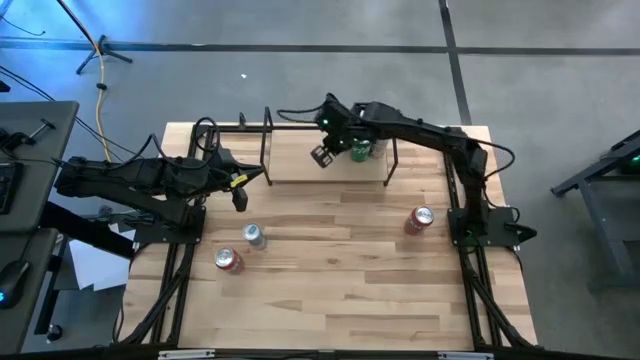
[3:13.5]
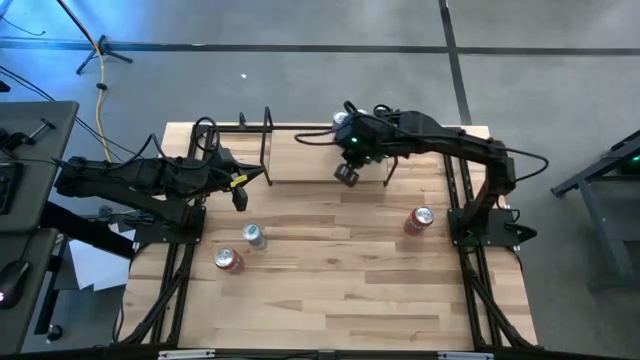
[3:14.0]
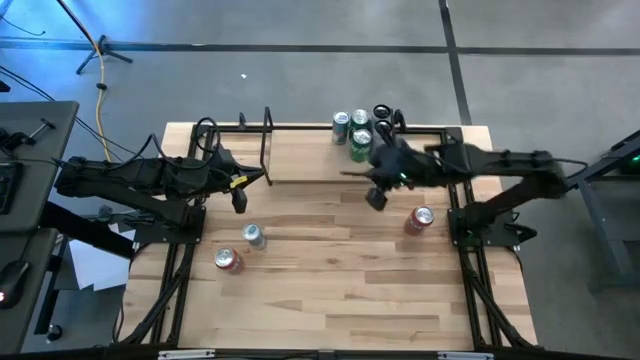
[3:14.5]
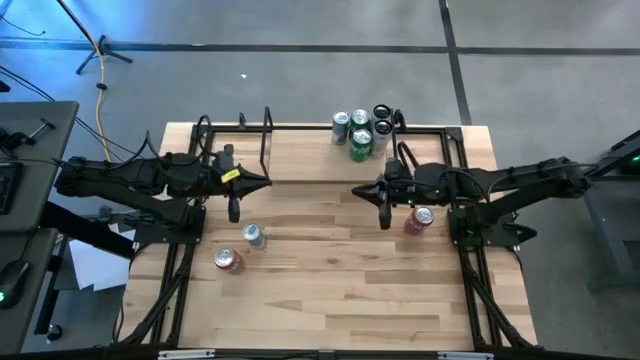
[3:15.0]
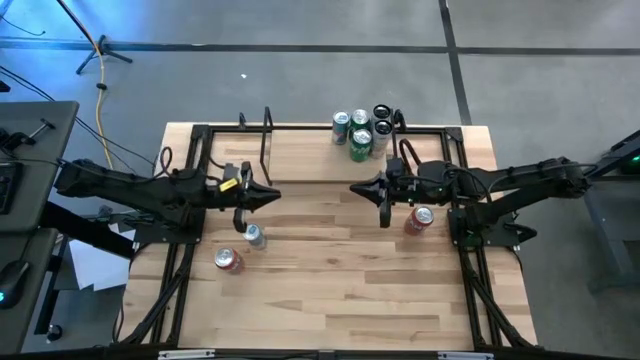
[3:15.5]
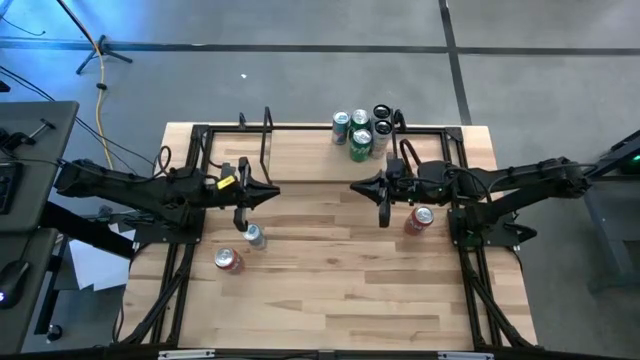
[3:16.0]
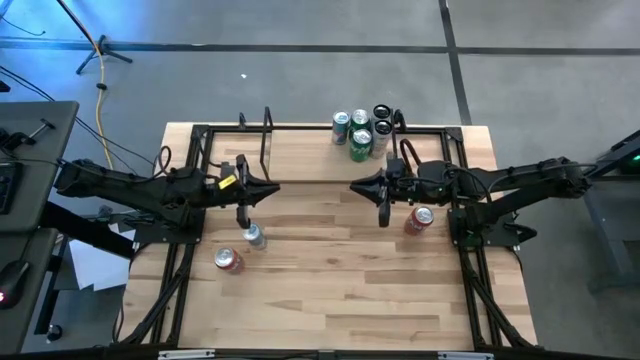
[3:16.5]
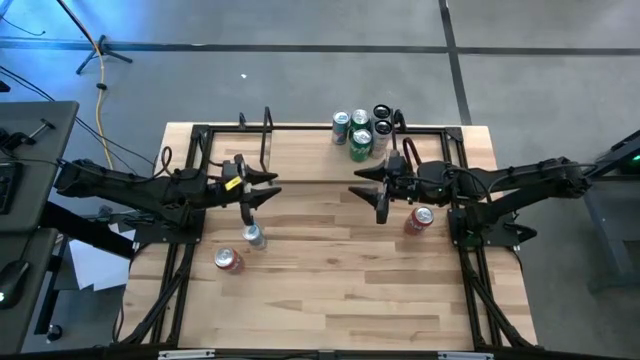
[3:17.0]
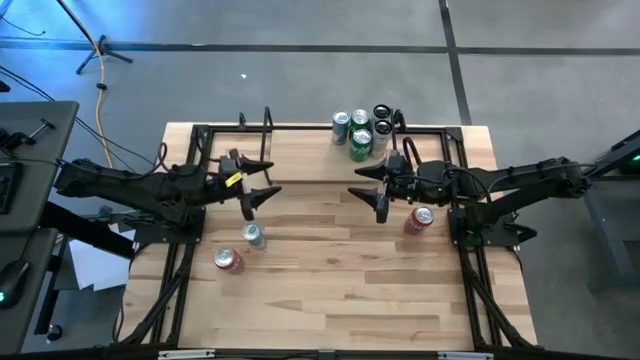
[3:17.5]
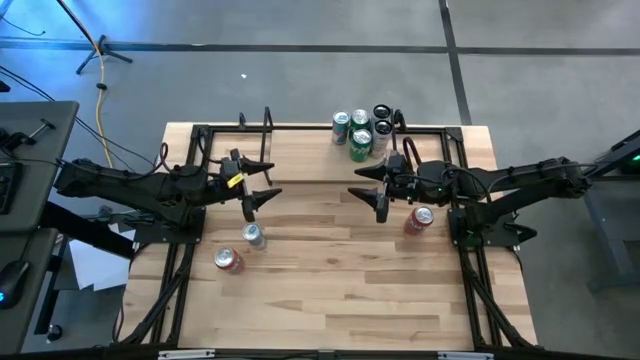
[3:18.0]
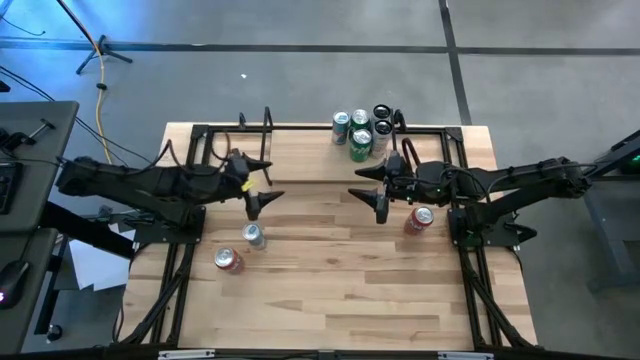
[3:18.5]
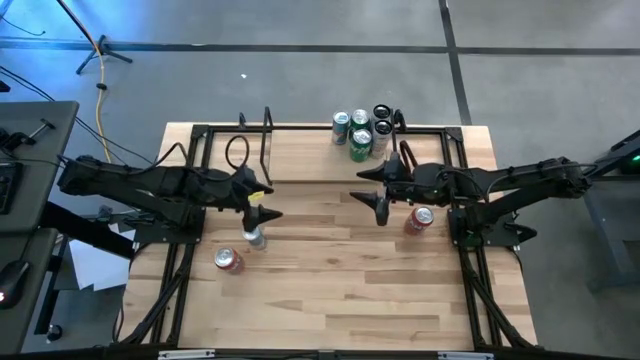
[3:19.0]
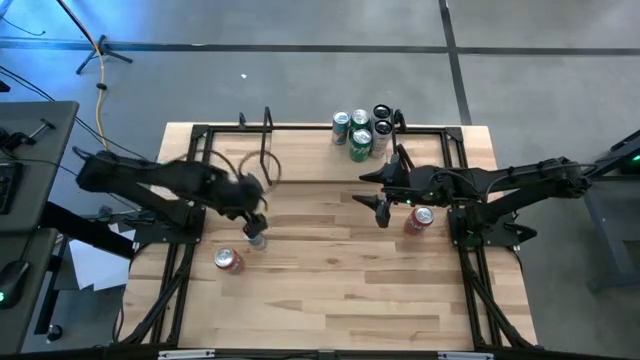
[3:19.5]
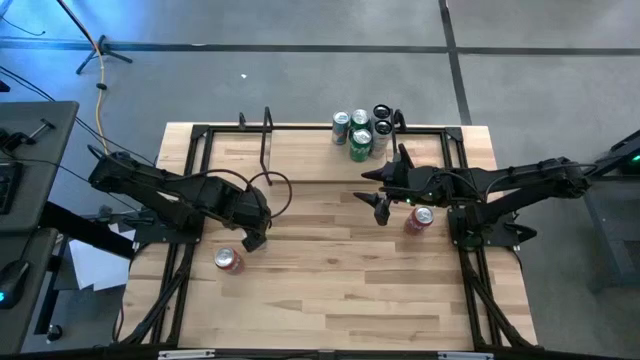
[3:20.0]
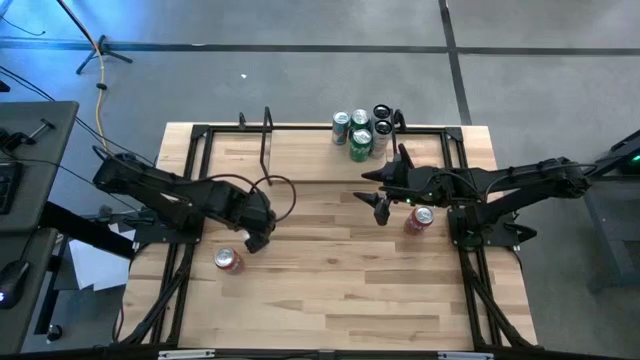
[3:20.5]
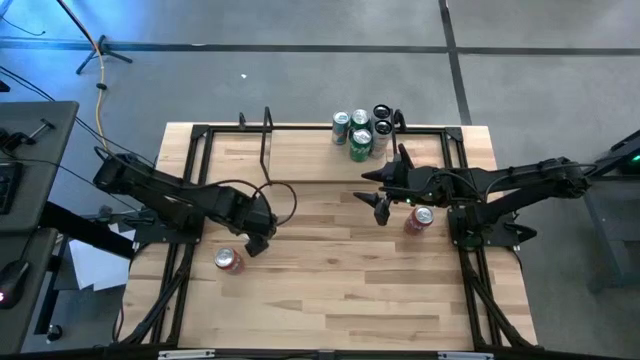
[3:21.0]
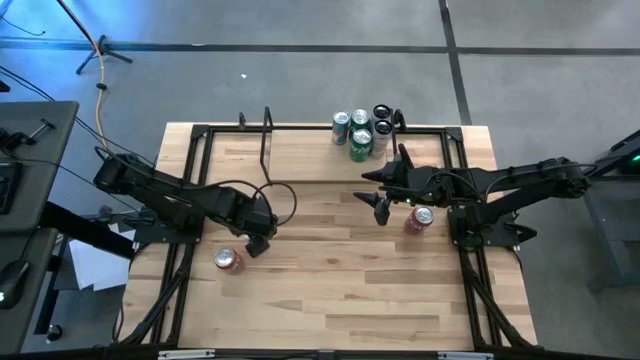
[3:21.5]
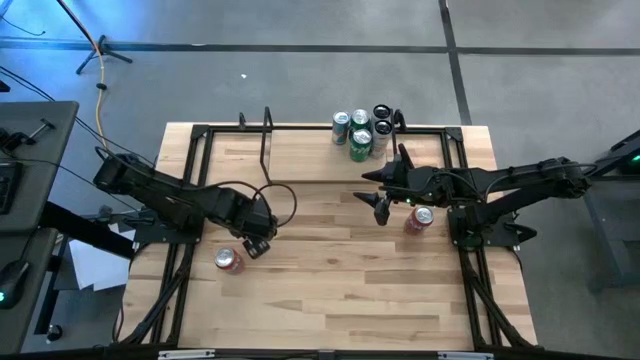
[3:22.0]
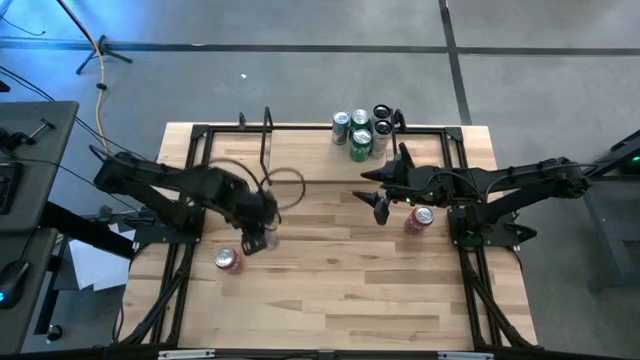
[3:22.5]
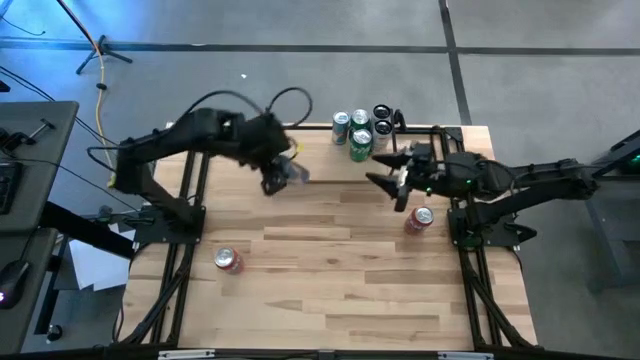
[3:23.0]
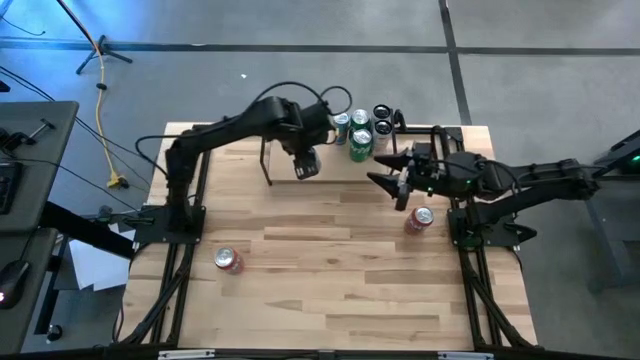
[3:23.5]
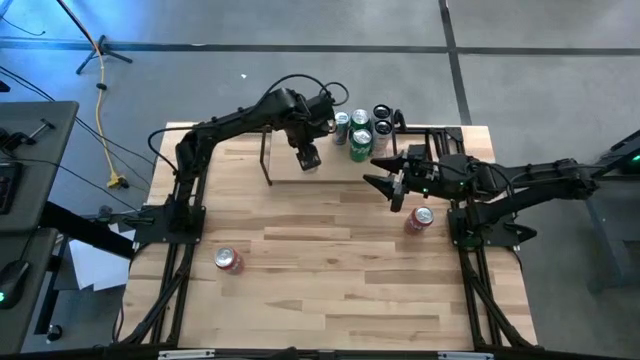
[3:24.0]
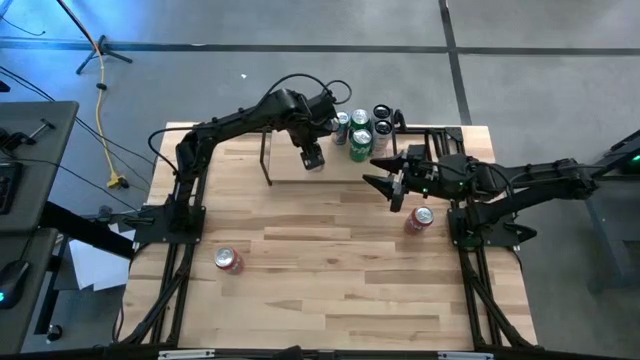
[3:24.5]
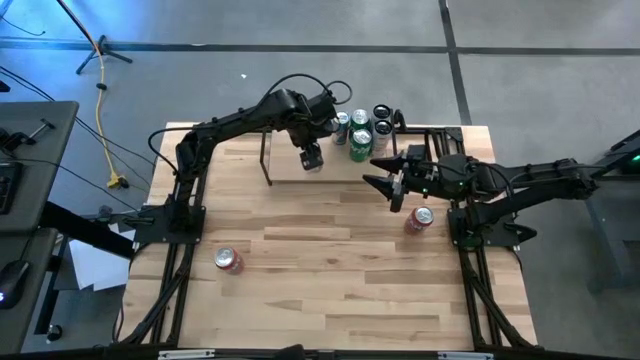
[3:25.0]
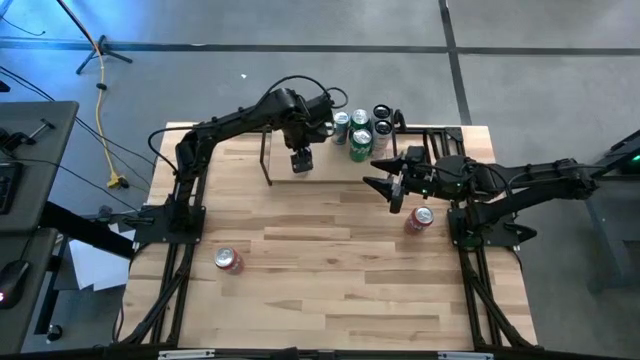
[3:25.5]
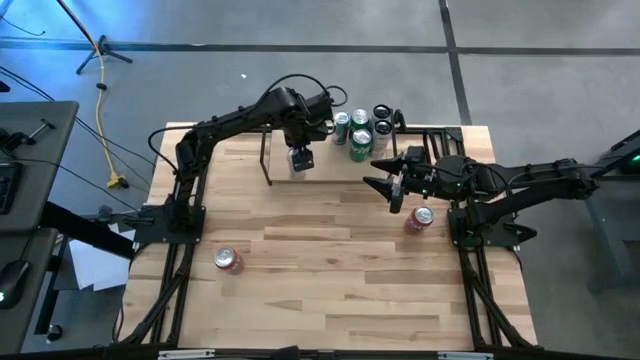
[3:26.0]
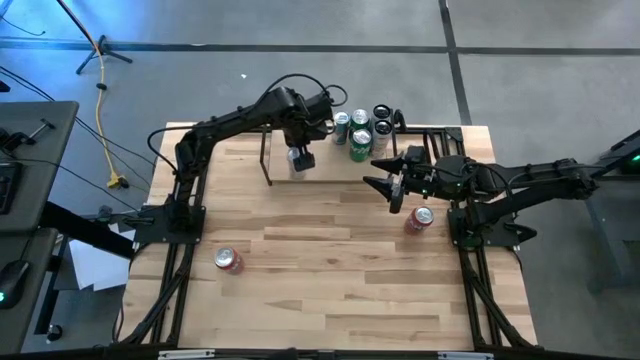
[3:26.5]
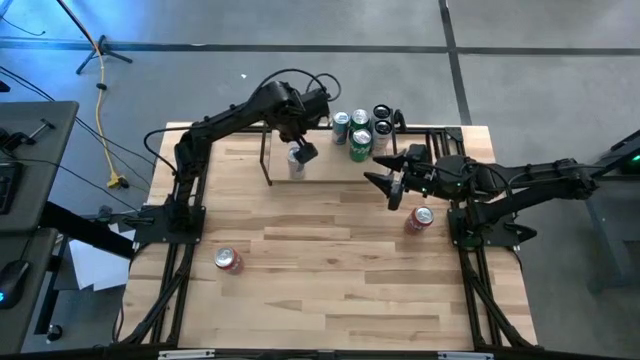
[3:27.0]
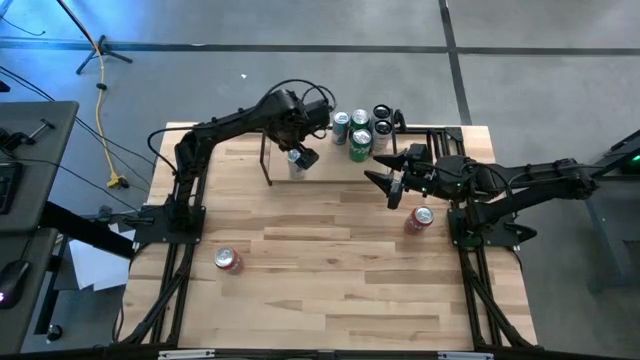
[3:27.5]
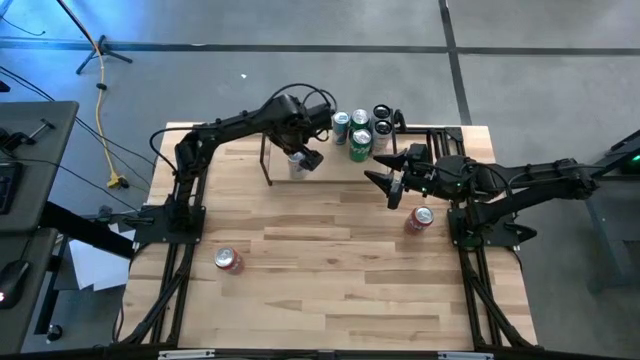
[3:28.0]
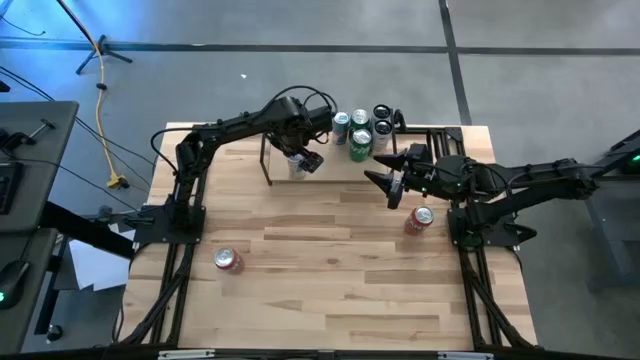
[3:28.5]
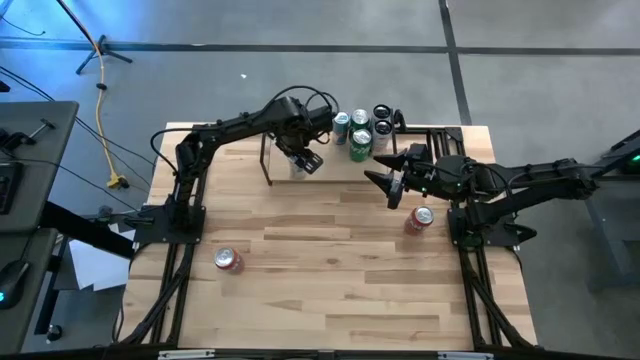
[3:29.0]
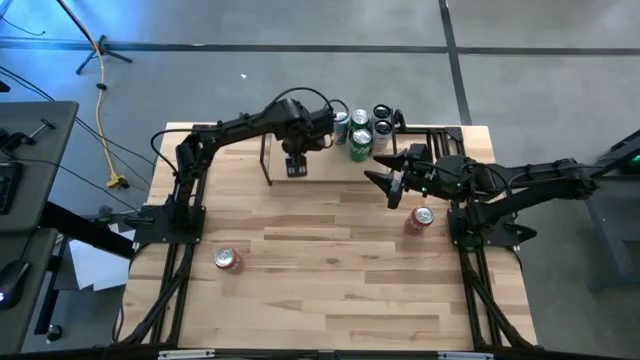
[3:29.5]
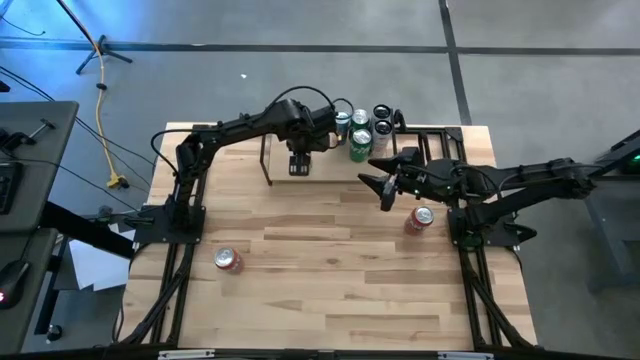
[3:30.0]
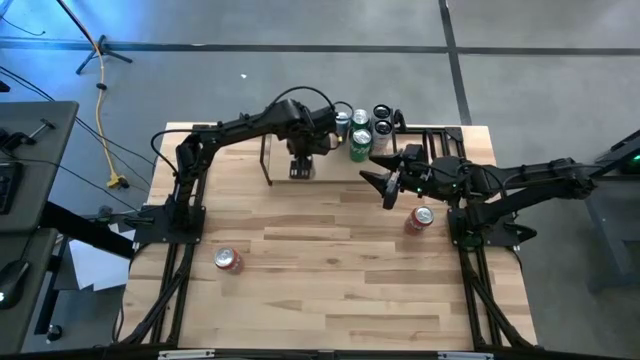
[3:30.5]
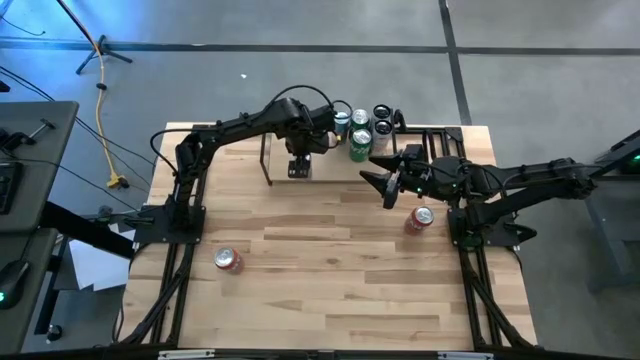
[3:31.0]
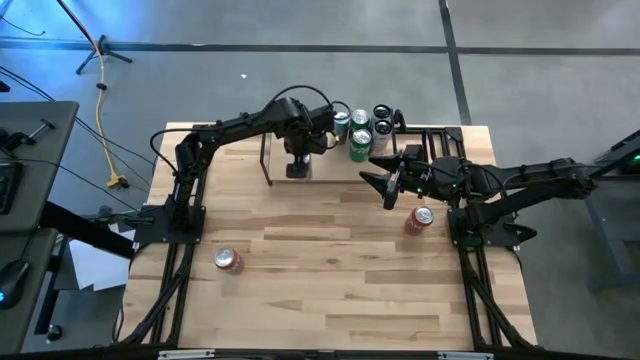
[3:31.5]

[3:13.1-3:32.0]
Task: Place canned beverage on shelf
Put the blue soda can on the shelf and align it with the other blue soda can

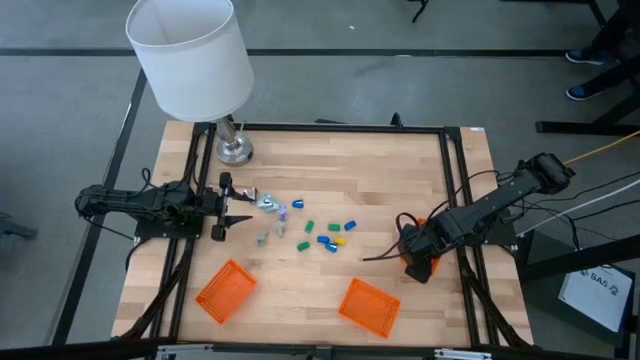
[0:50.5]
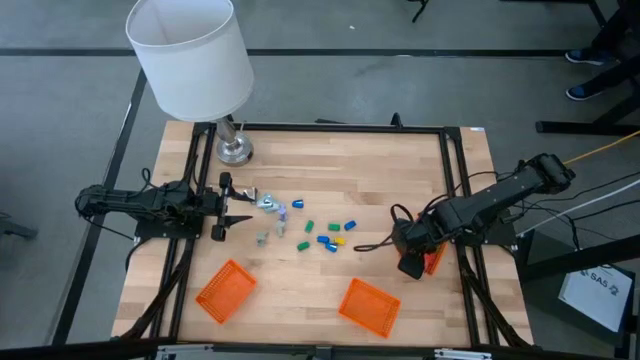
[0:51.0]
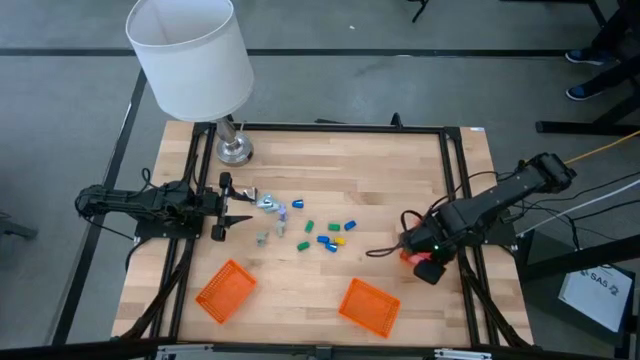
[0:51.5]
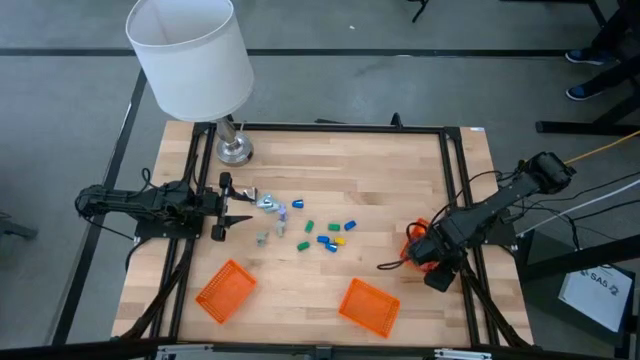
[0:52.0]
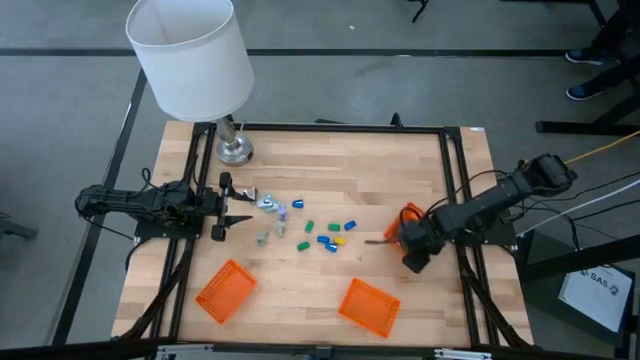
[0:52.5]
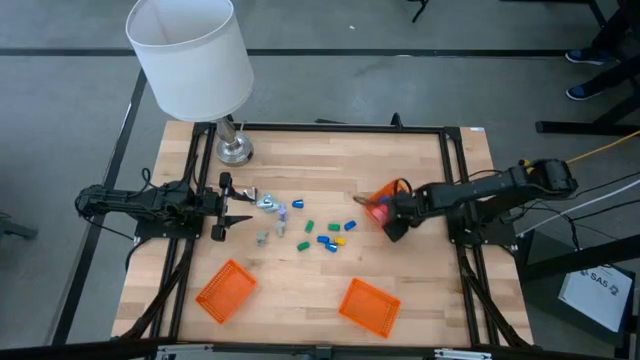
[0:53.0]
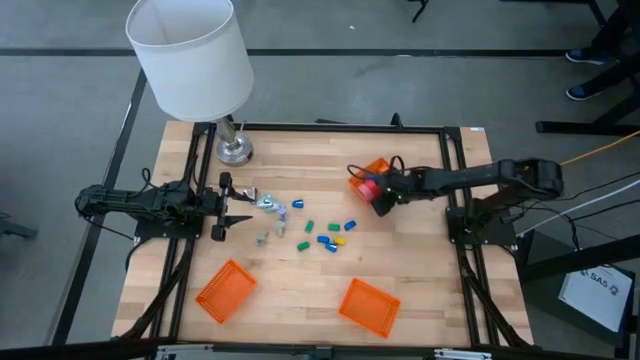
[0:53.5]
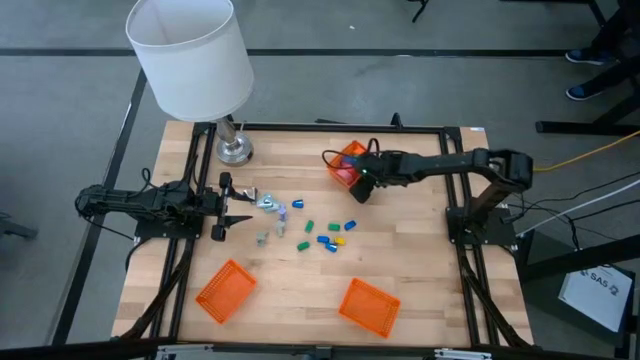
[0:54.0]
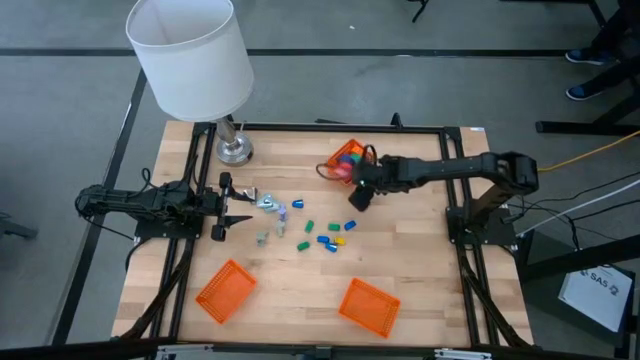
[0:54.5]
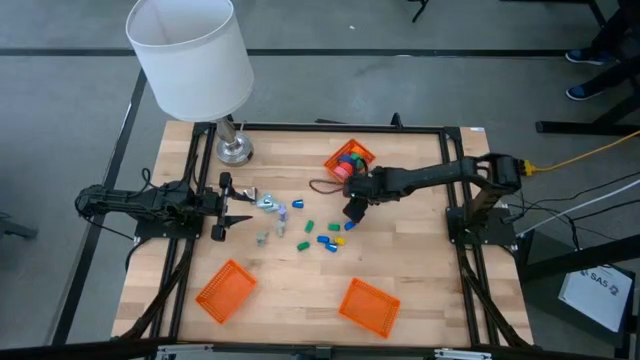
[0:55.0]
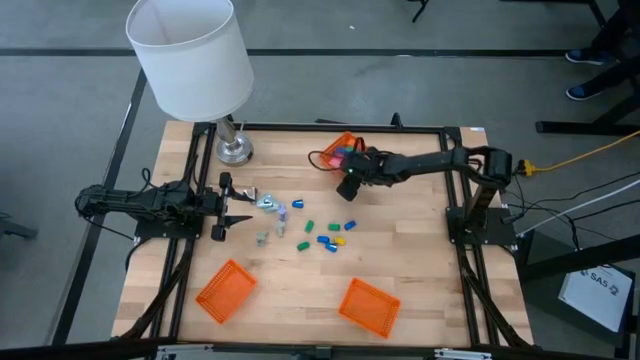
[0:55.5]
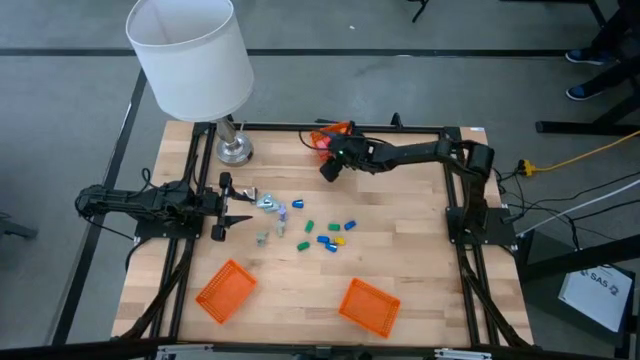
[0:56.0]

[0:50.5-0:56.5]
Task: Pick and place Stapler, Stapler remover, tape
Move the right orange bin to the top of the table
